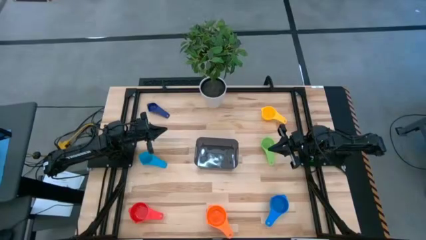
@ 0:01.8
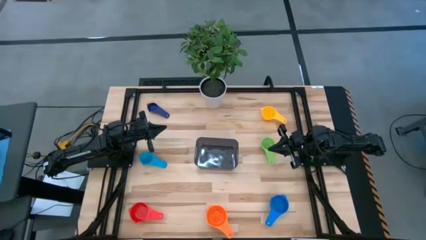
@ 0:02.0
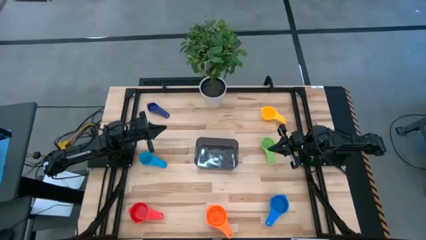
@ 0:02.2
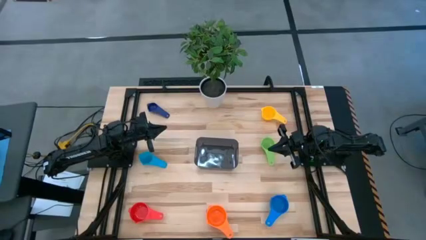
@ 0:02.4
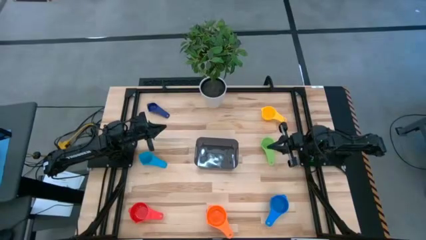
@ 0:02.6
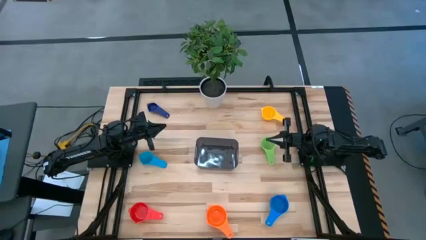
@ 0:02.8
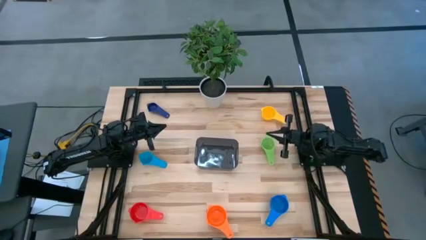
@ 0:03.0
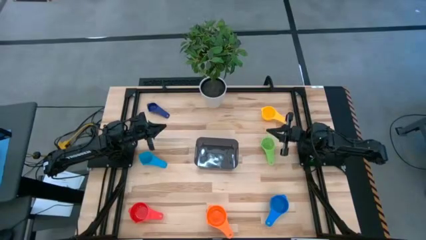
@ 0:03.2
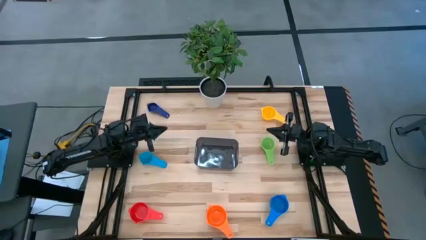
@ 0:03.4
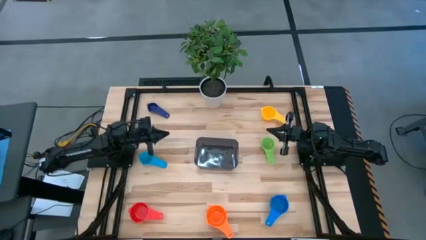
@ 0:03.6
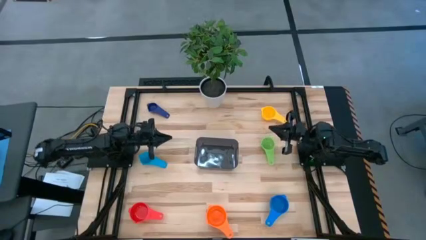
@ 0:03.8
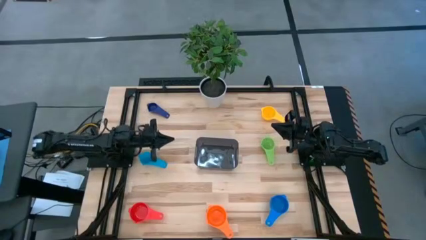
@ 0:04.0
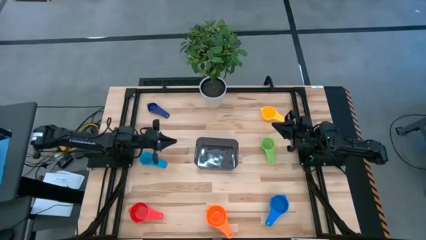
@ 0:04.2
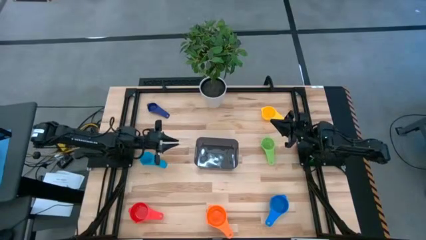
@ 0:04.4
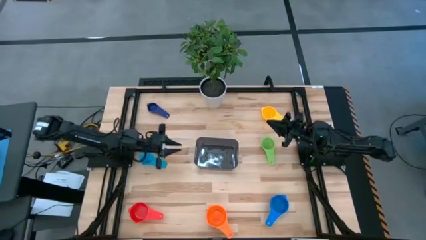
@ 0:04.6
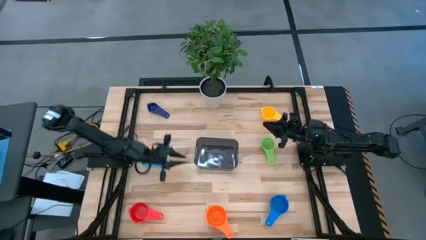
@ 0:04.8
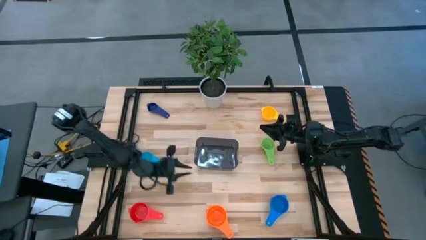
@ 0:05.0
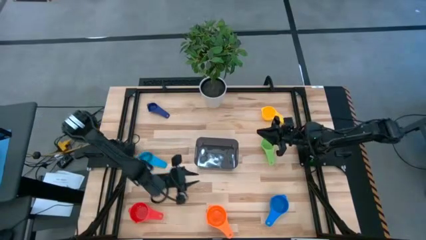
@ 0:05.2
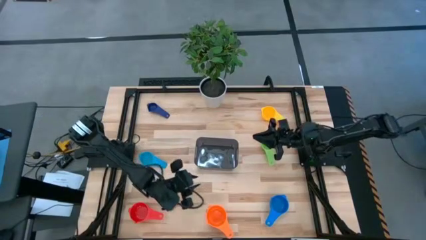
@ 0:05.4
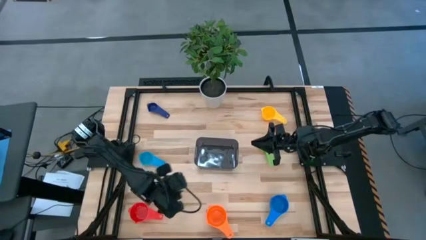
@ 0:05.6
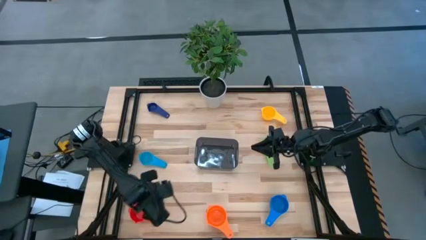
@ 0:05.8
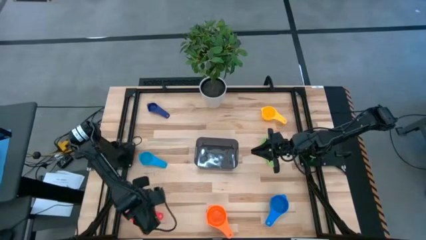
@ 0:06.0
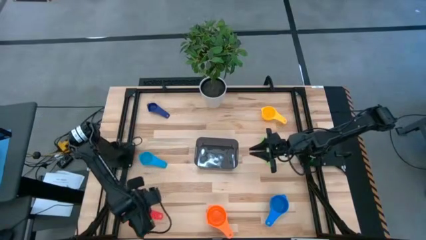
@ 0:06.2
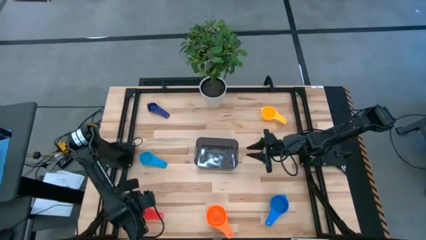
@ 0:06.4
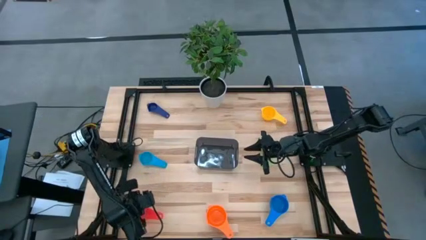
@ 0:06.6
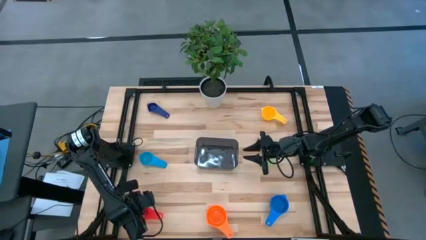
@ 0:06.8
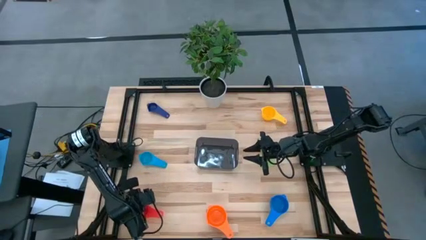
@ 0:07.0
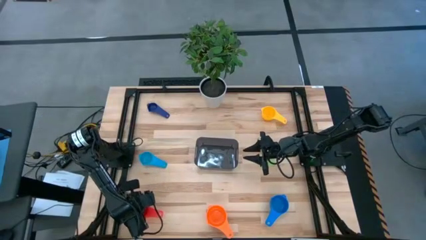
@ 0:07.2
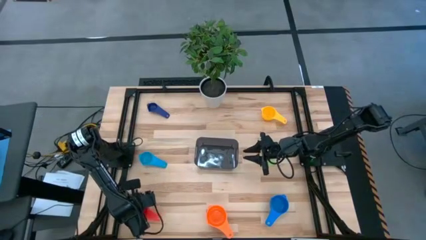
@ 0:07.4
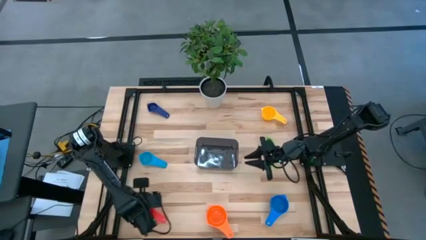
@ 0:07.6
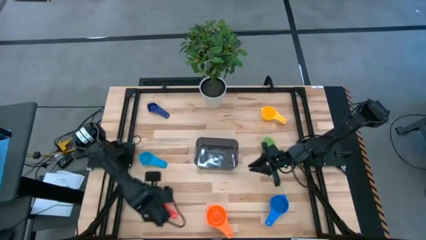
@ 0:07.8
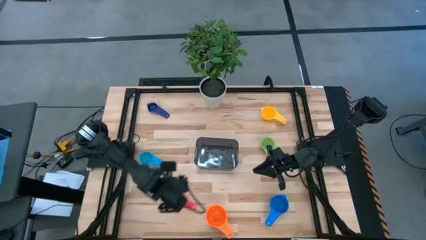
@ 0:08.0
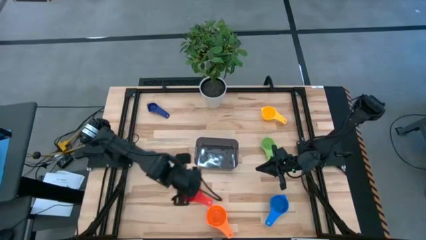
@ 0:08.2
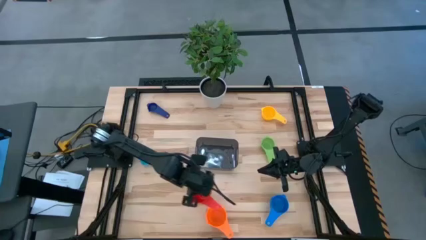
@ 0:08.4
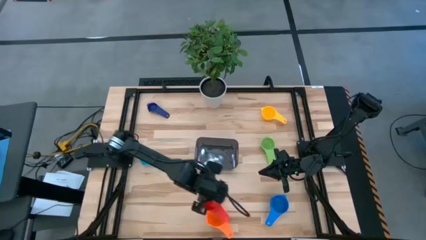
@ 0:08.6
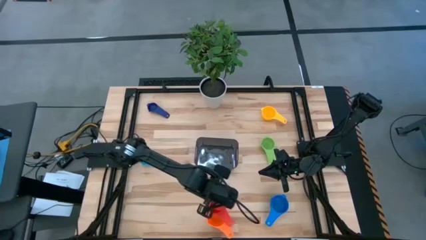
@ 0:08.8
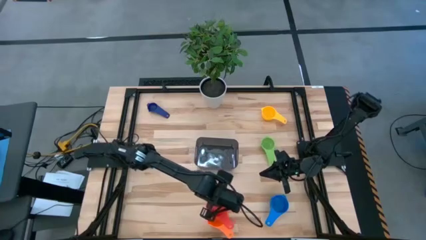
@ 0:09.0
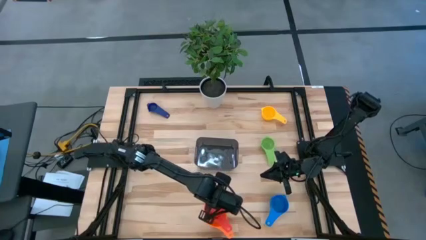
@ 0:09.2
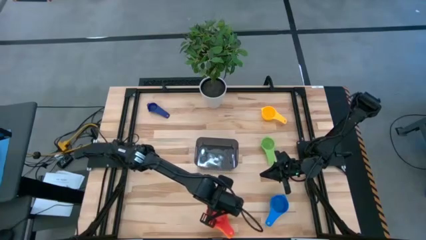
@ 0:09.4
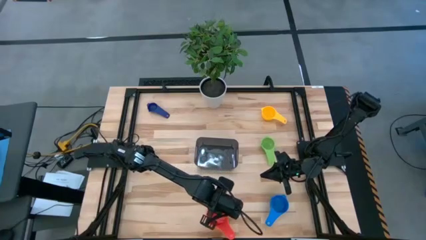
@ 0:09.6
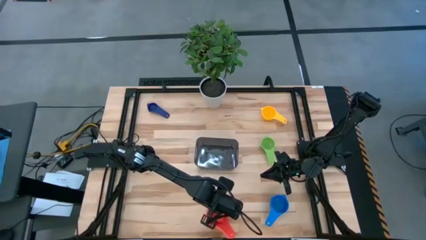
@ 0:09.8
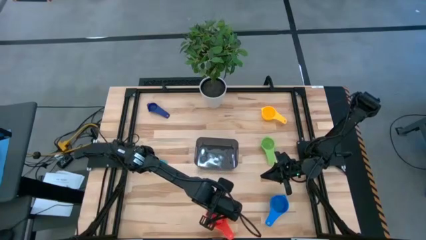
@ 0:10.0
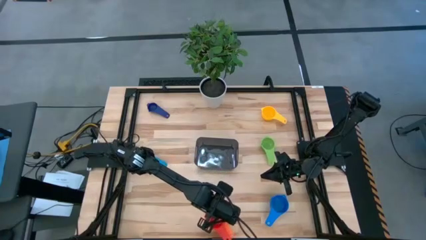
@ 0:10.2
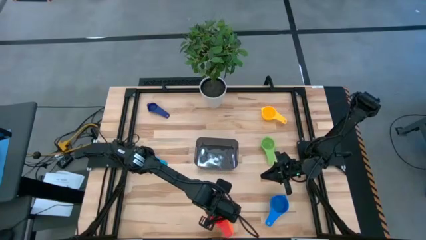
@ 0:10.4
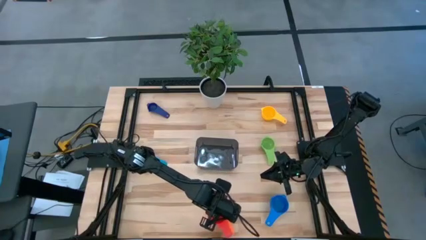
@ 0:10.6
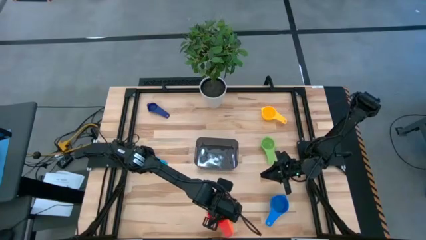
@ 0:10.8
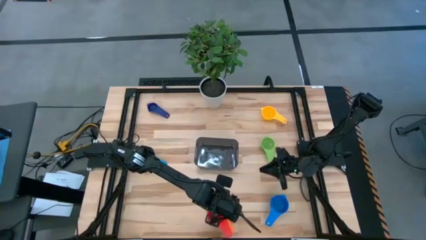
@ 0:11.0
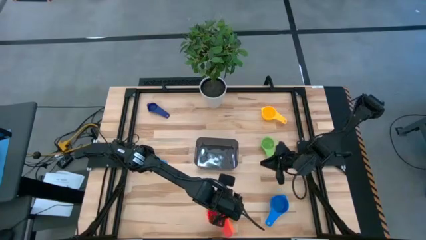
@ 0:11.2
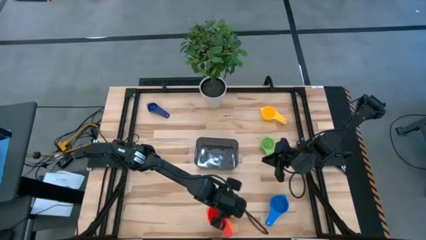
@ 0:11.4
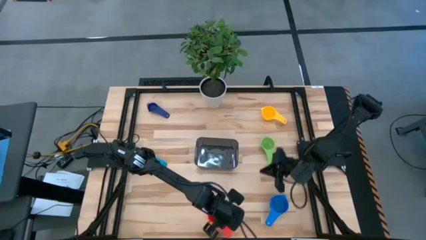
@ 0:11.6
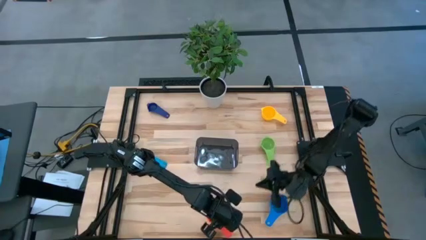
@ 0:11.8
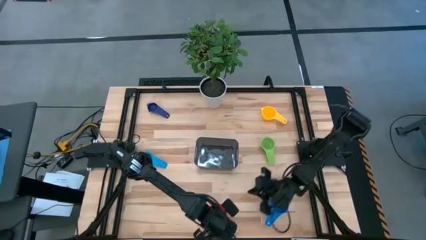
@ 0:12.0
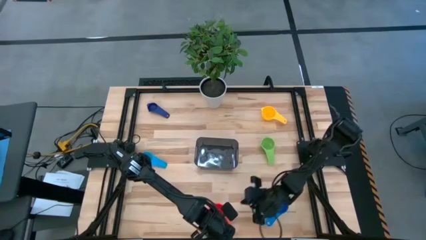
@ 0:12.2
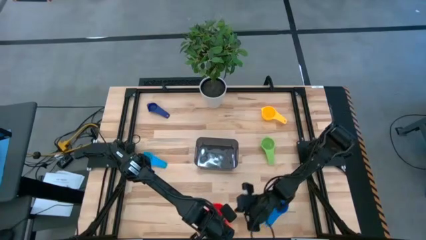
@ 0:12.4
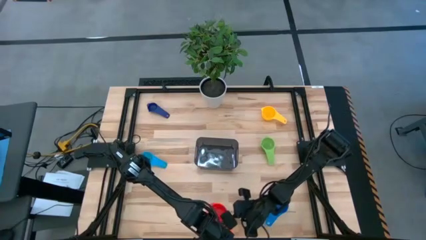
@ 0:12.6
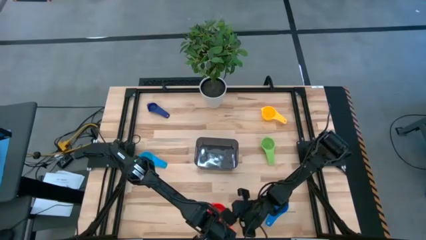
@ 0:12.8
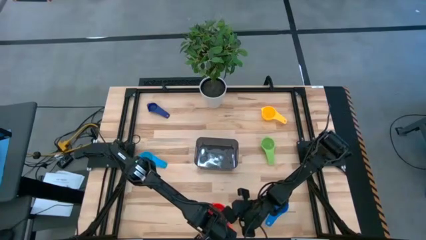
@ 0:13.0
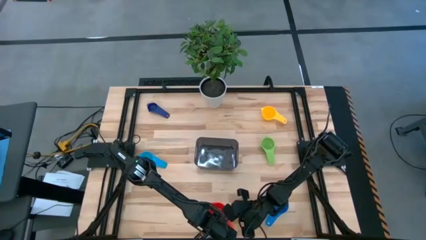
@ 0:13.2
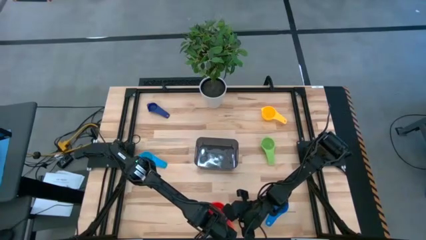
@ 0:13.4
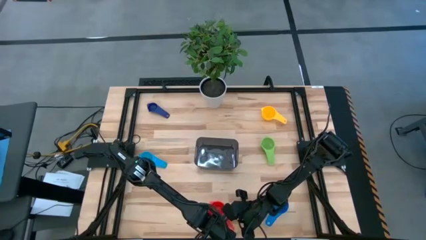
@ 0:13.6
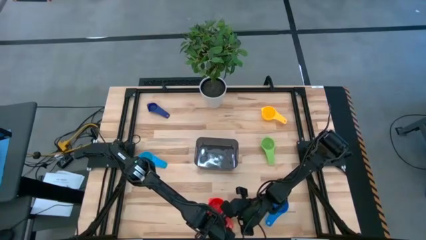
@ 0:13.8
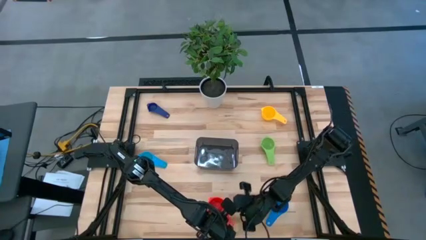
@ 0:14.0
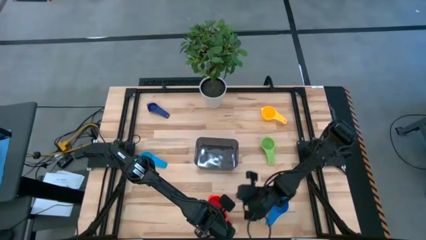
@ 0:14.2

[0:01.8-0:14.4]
Task: Nest measuring cups in basket
Stack the red measuring cup on the top of the orange measuring cup

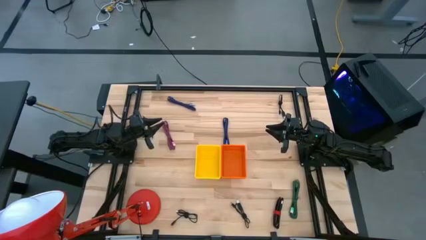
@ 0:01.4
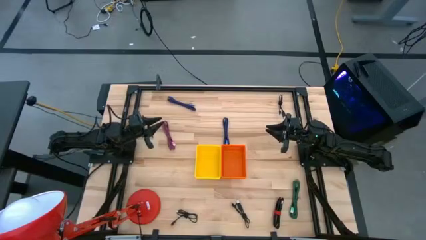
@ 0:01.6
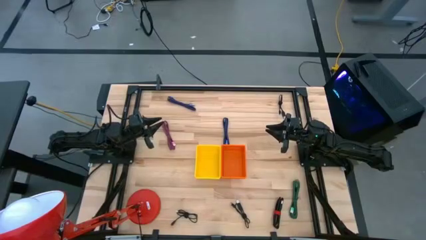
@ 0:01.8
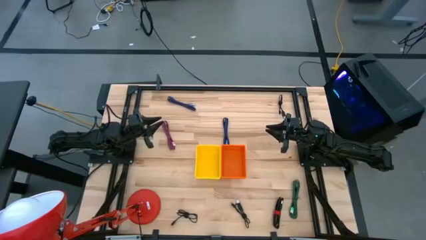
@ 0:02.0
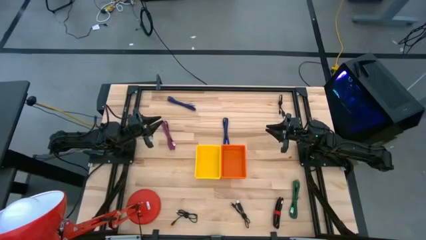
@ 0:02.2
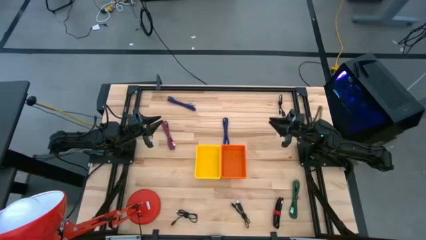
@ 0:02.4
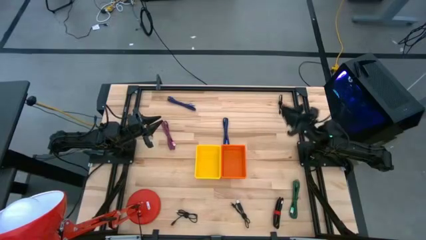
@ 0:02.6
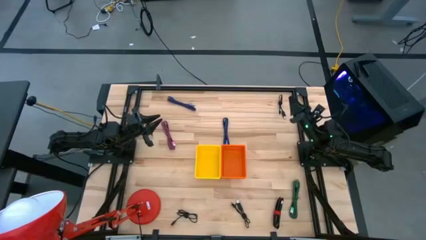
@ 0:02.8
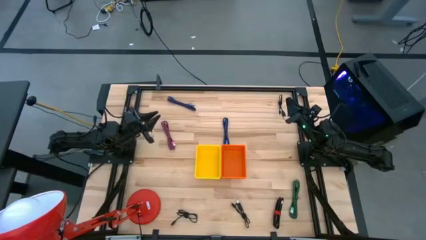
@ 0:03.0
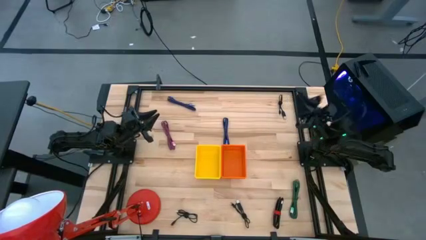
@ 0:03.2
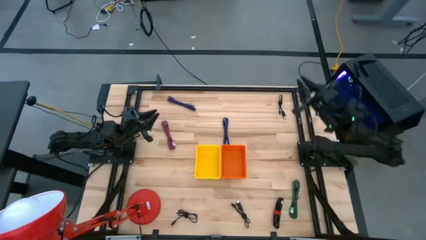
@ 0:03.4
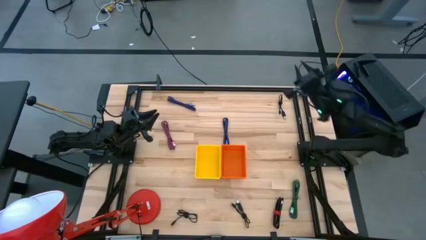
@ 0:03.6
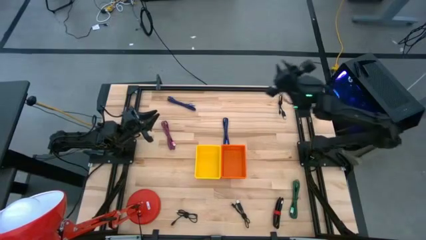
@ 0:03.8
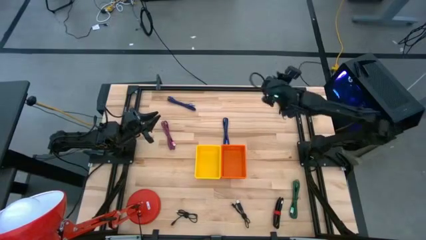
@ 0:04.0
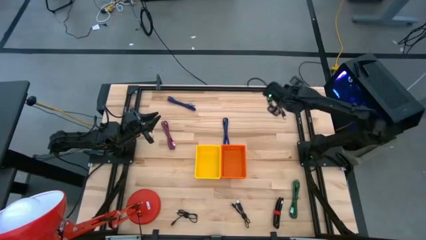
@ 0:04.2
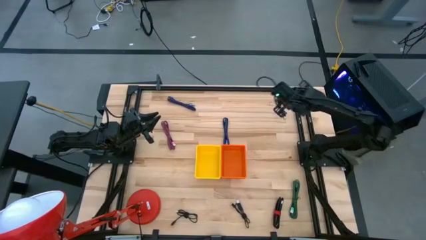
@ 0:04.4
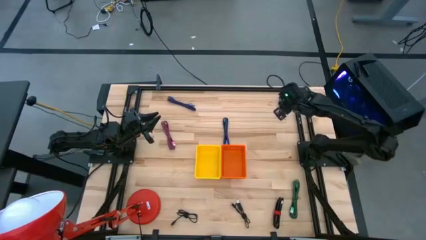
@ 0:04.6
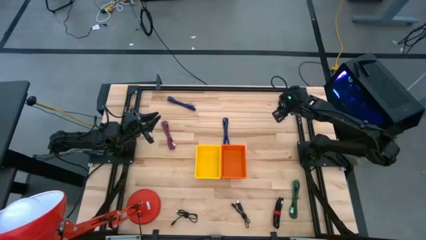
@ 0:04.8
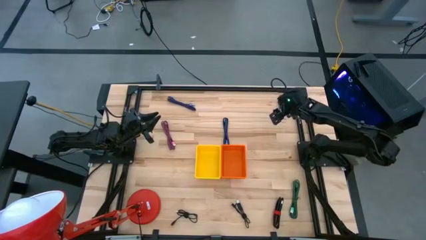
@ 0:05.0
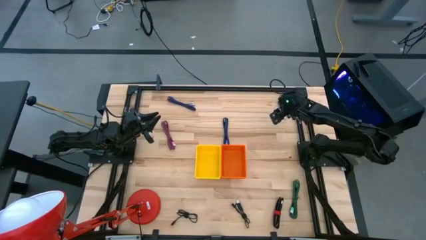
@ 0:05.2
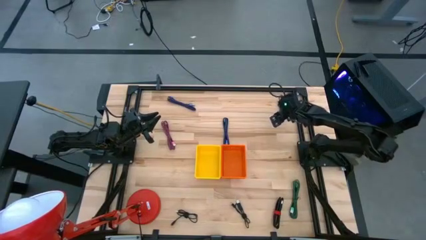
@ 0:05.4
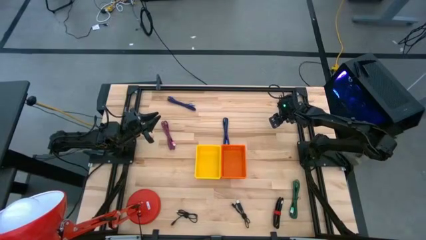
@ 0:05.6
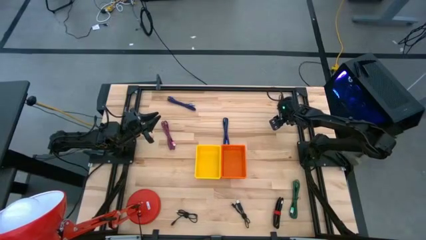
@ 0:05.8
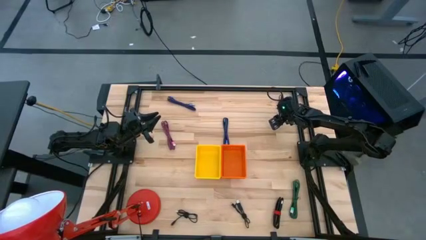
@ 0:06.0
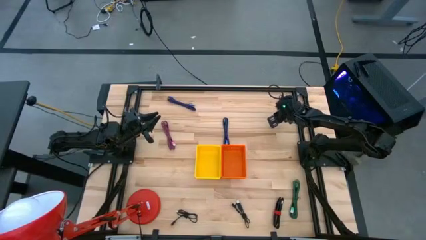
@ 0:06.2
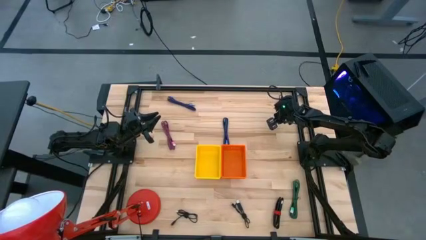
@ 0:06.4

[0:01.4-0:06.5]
Task: Pick & Place USB Port
Put the top black charger cable into the yellow bin
